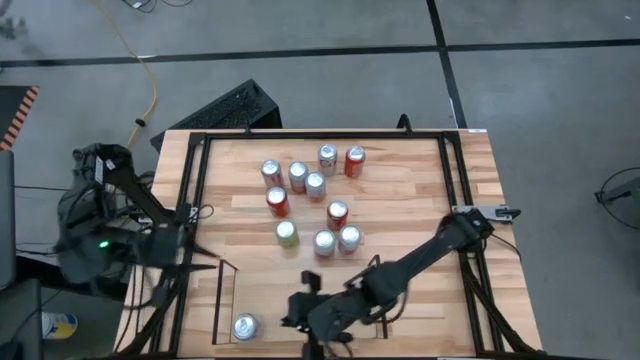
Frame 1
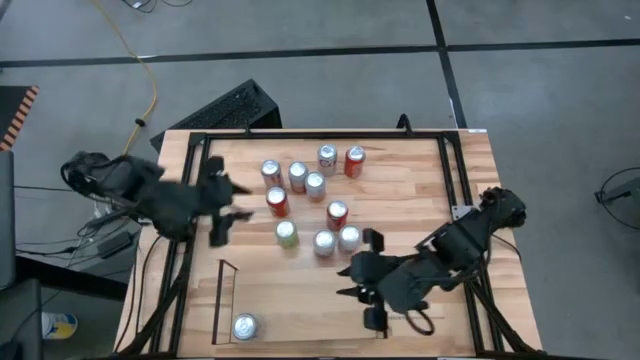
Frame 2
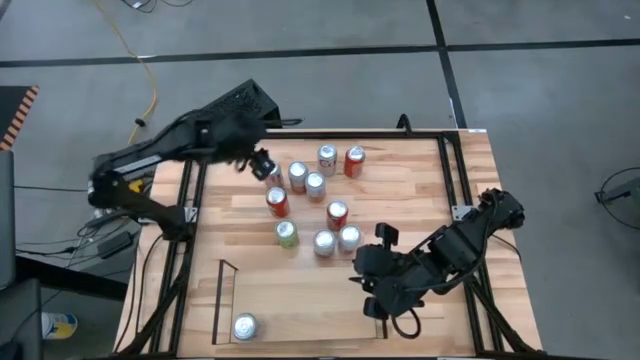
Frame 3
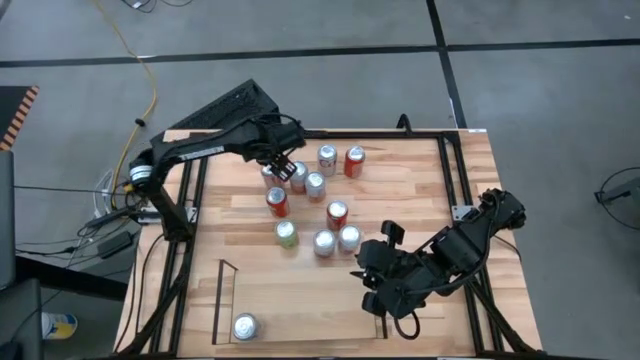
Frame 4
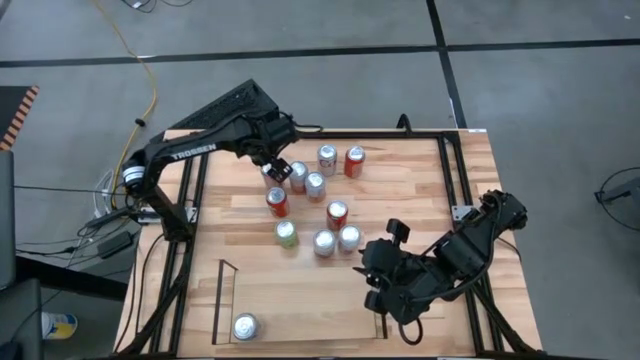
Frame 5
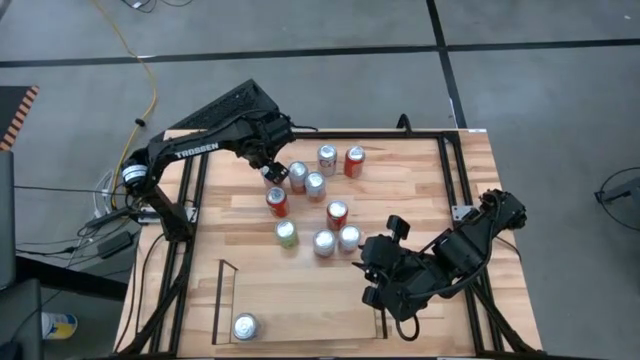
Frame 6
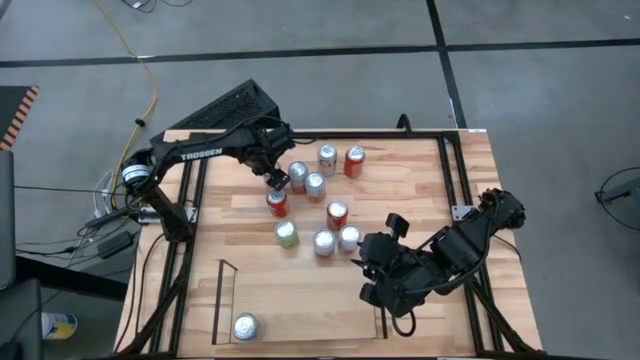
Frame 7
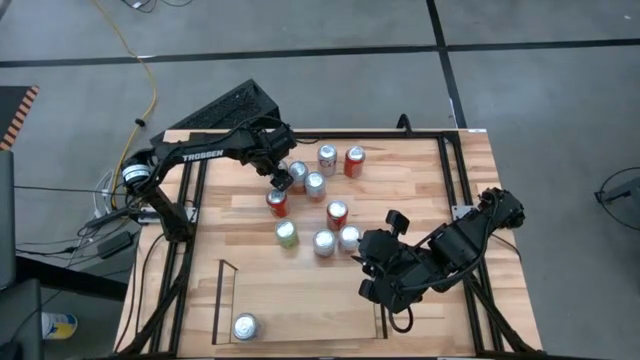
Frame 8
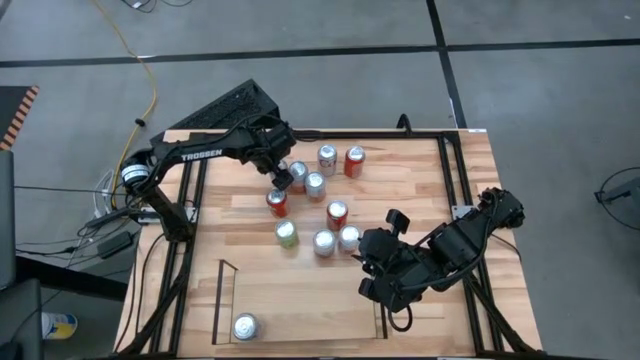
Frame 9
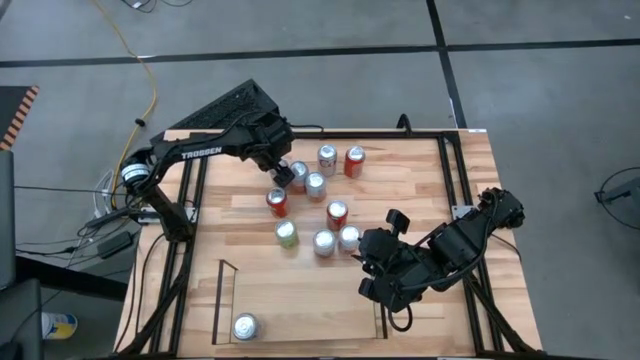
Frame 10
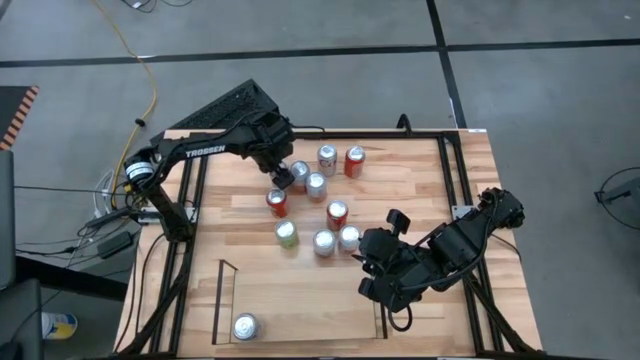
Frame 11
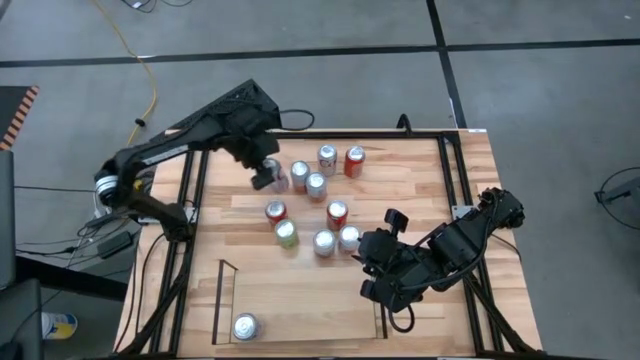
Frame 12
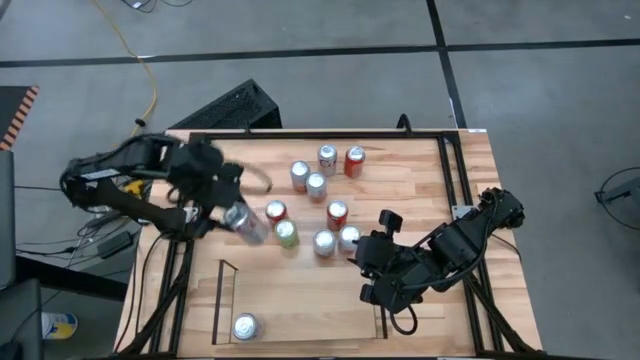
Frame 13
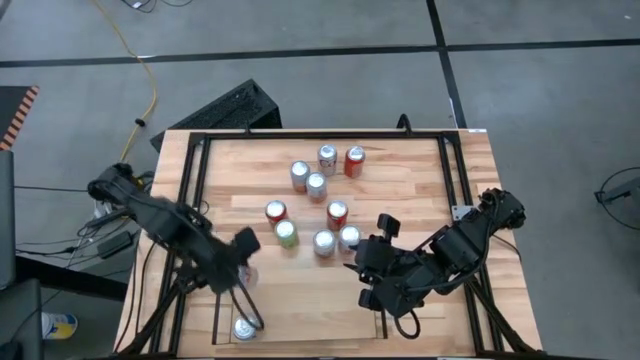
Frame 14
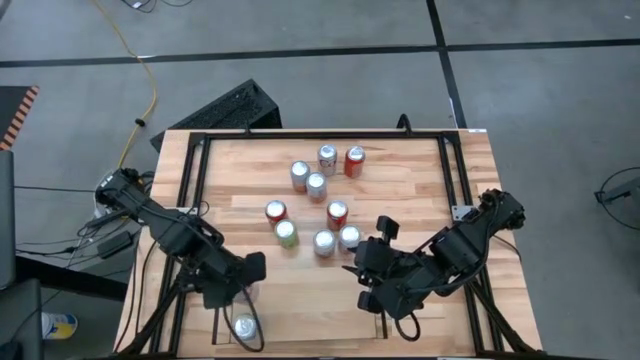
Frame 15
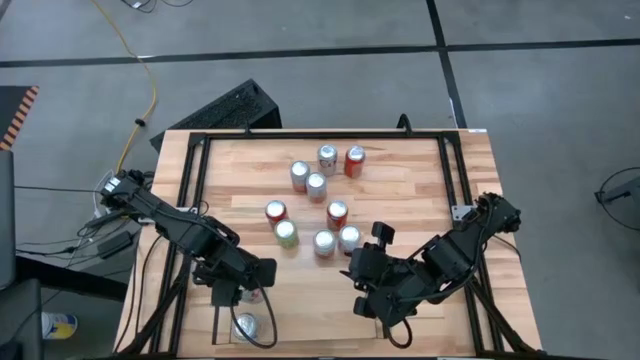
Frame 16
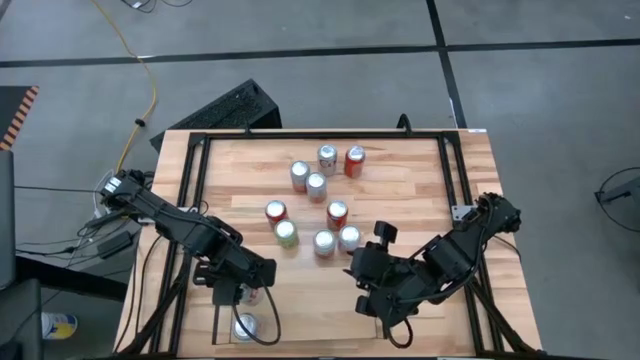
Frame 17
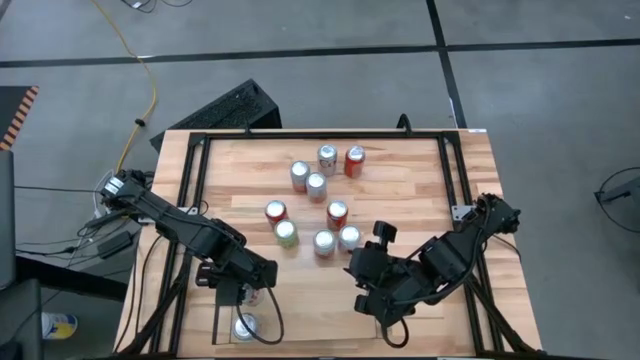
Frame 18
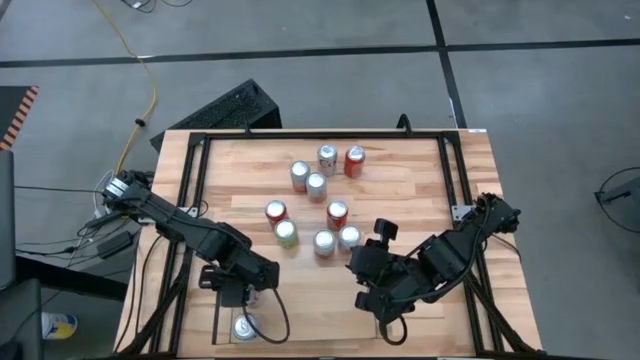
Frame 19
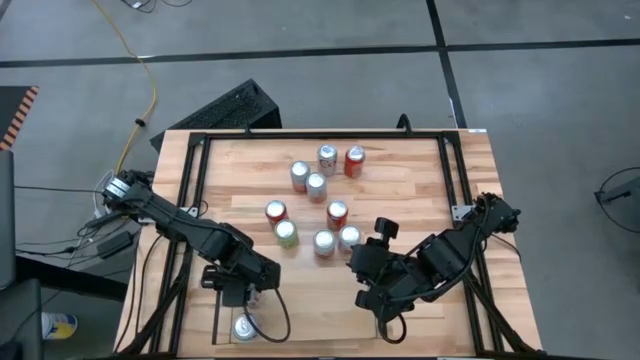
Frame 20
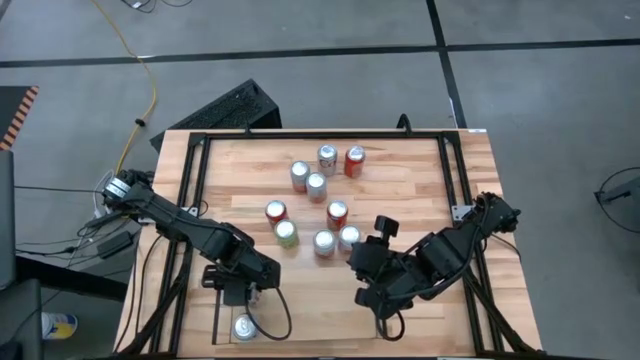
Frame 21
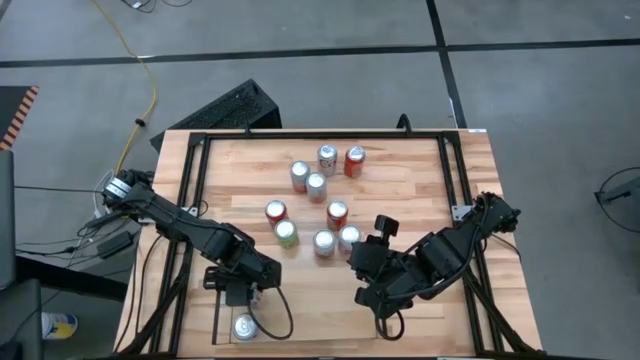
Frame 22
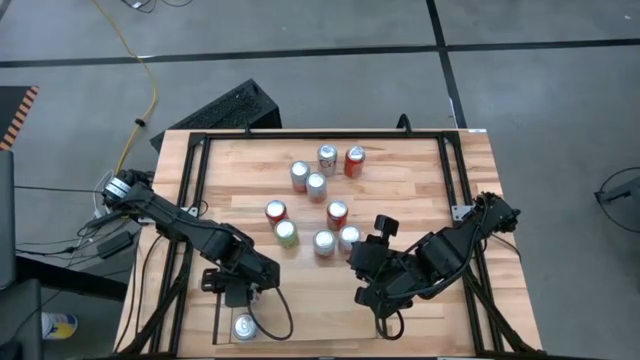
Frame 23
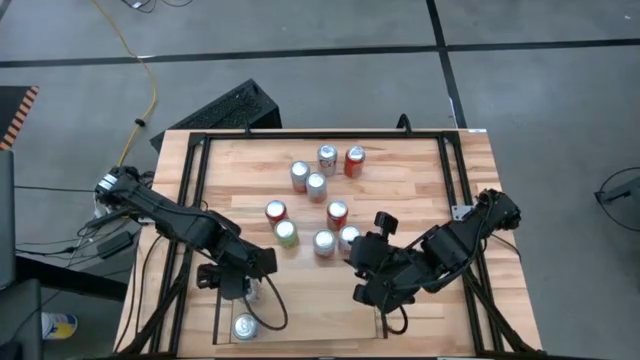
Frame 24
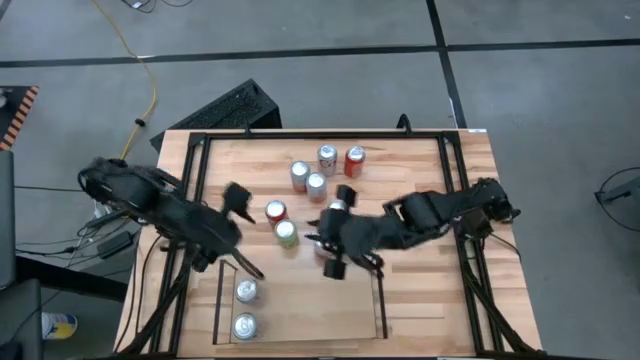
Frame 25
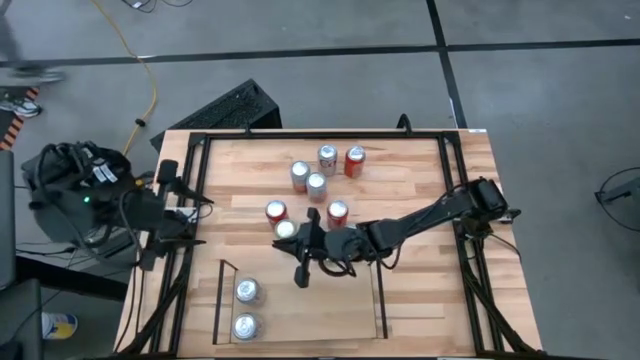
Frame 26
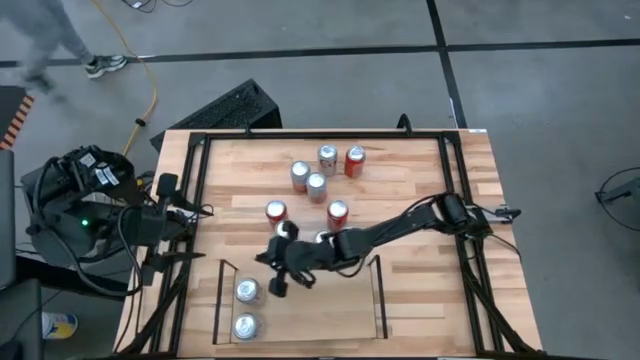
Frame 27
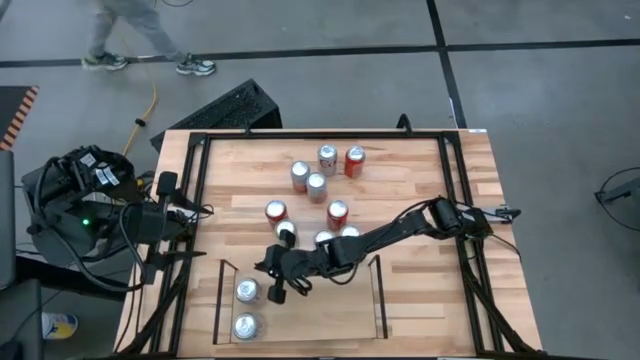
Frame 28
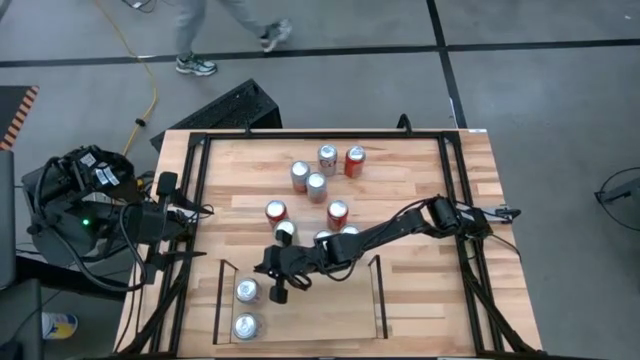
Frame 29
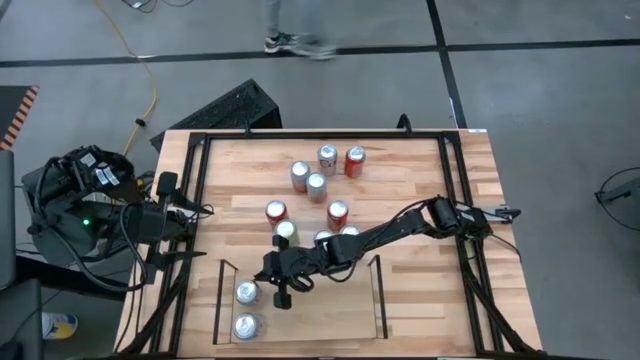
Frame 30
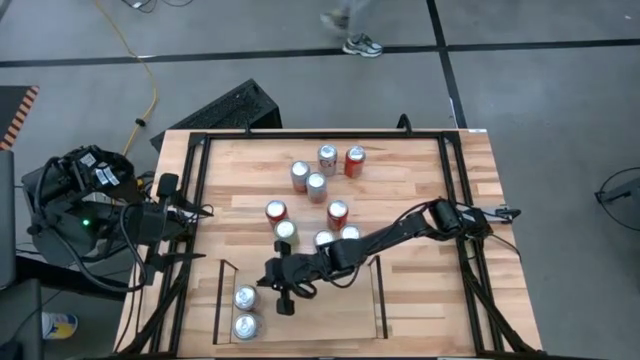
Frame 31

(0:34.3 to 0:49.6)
Task: Place canned beverage on shelf
Put the silver soda can on the shelf aligned with the other silver soda can

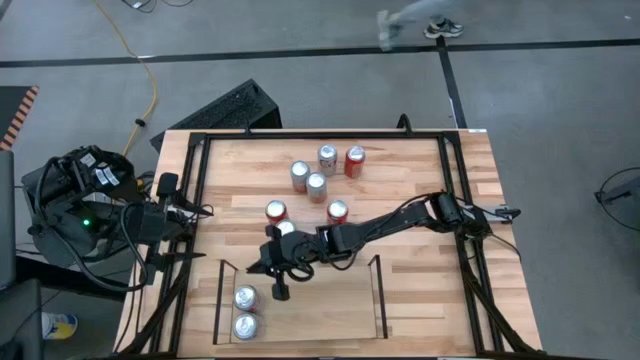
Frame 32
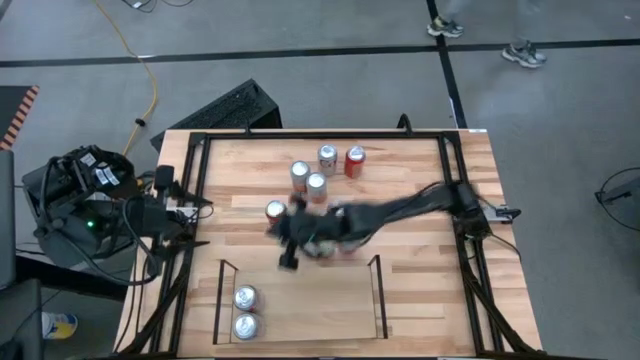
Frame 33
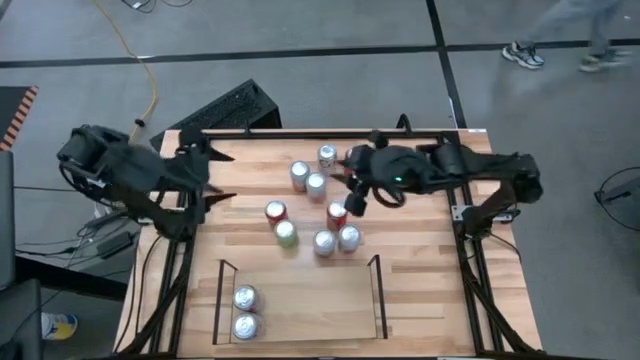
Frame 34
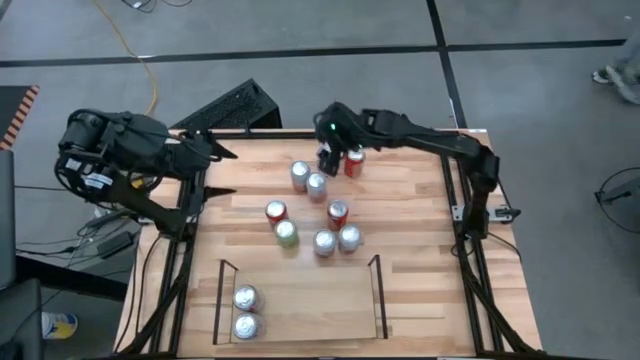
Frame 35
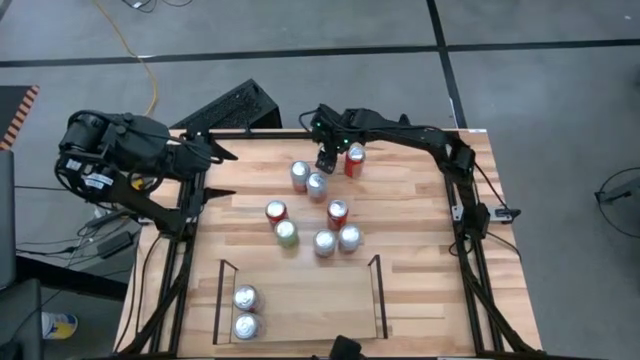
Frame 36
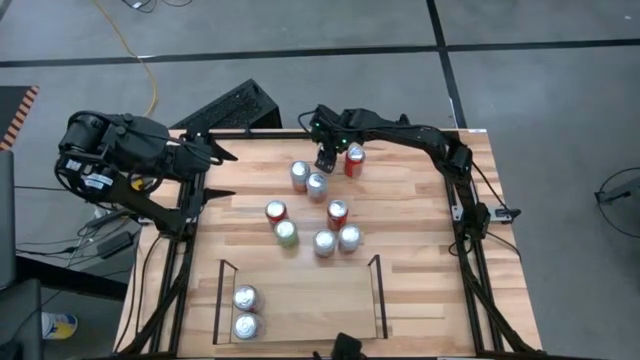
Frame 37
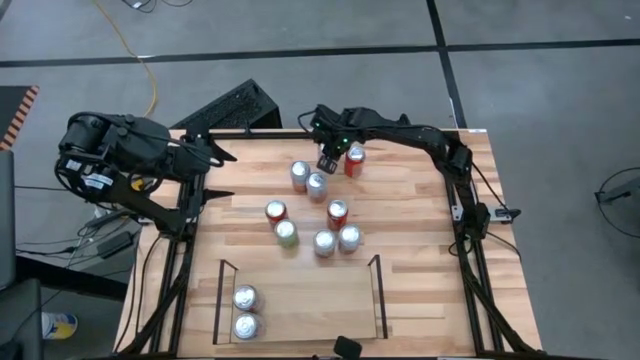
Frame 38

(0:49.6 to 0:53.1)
Put the silver soda can on the shelf aligned with the other silver soda can

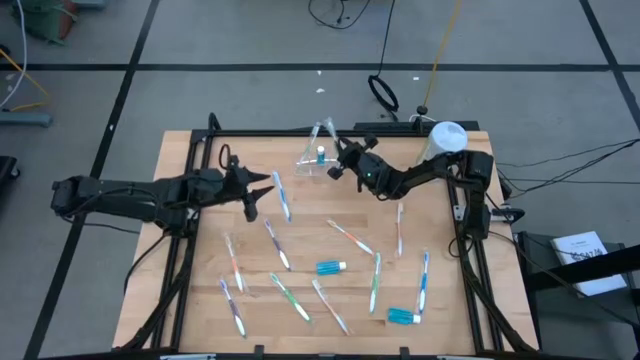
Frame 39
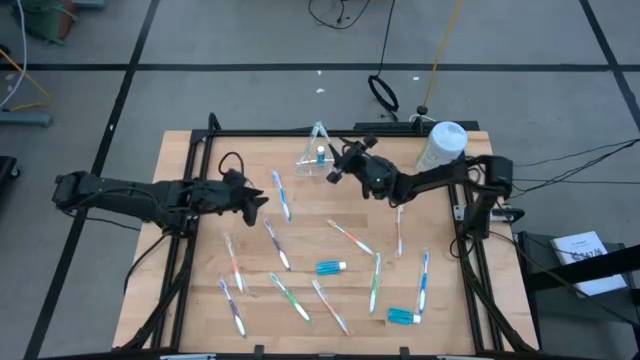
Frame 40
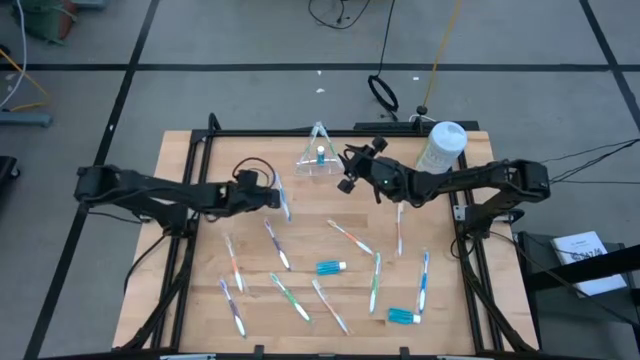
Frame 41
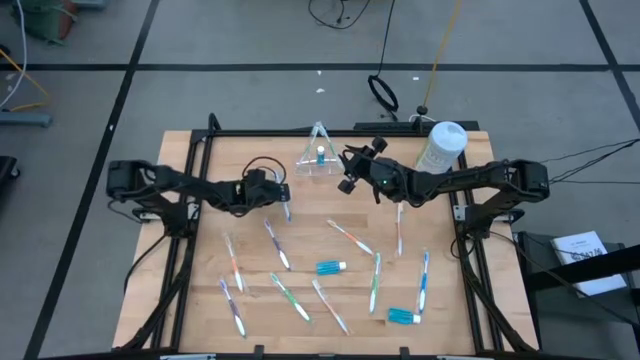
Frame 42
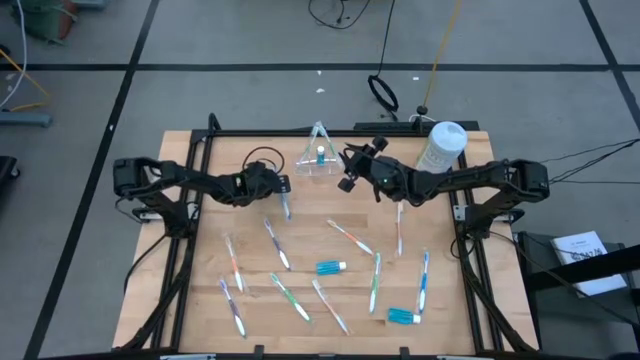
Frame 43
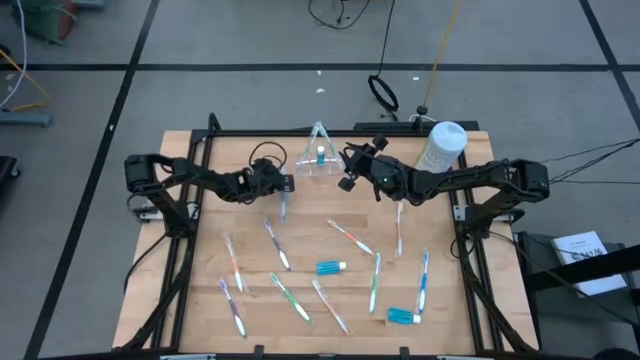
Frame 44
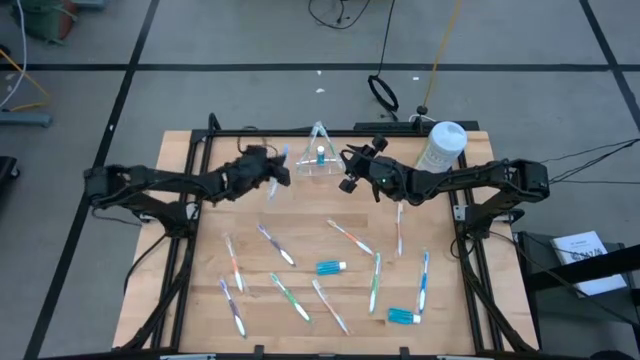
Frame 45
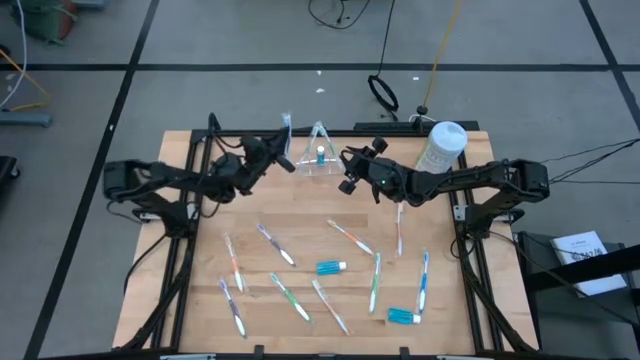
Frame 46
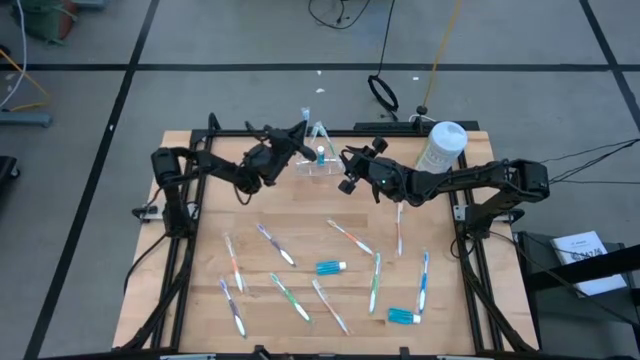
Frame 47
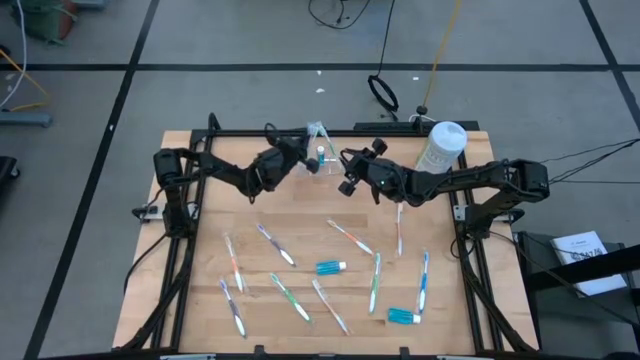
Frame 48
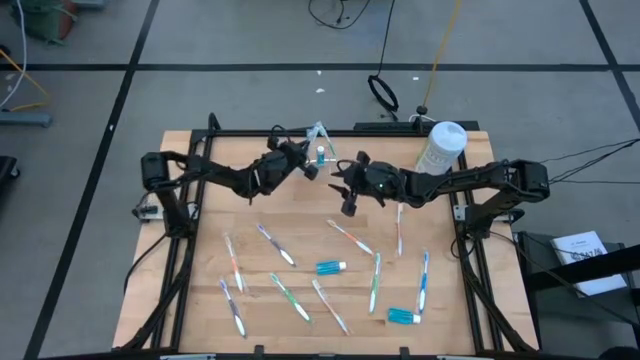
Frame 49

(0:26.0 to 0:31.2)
Task: Pick & Place Toothbrushes
Put the blue toothbrush into the transparent organizer
